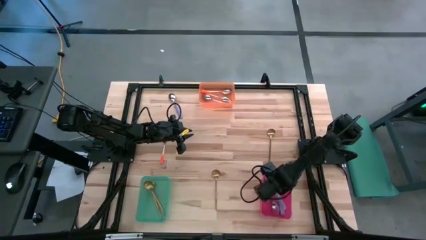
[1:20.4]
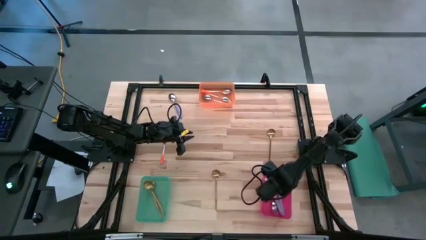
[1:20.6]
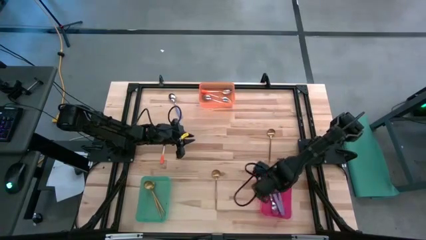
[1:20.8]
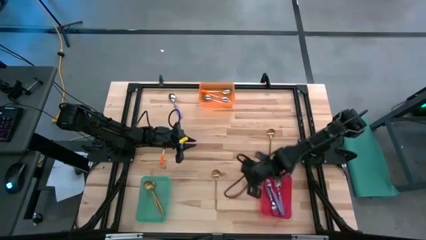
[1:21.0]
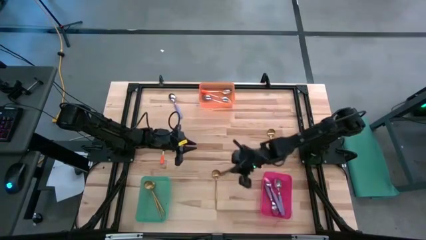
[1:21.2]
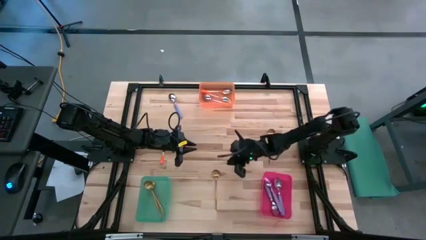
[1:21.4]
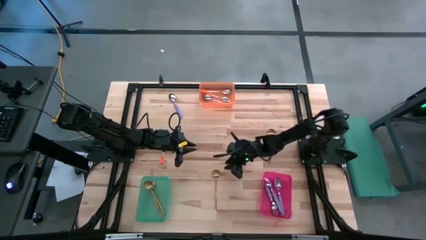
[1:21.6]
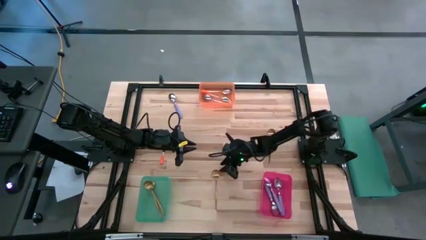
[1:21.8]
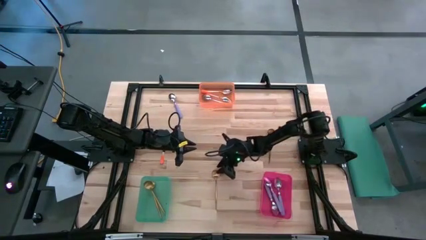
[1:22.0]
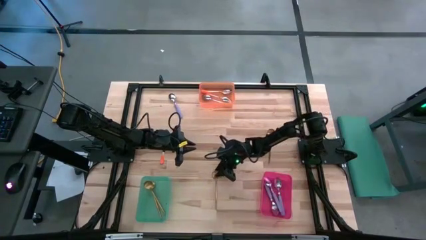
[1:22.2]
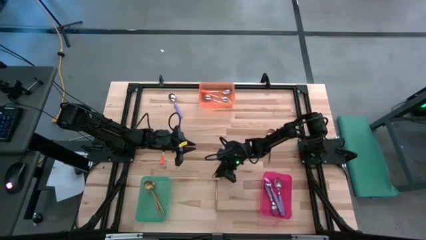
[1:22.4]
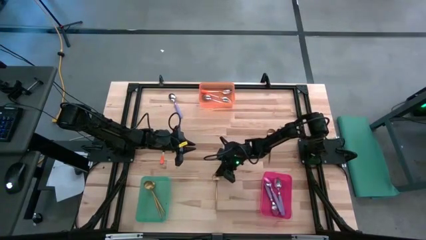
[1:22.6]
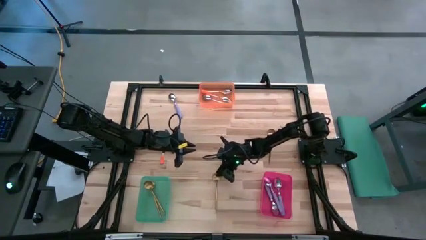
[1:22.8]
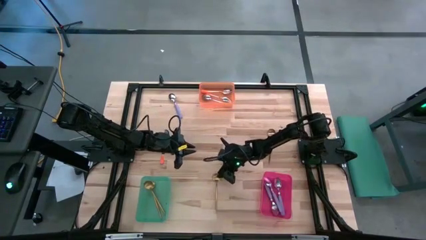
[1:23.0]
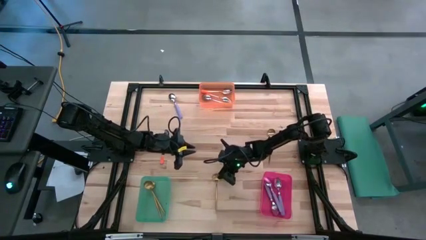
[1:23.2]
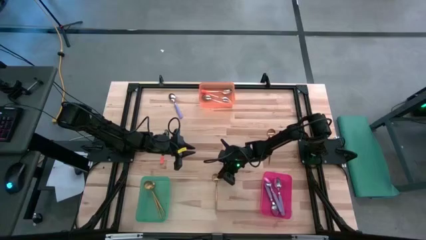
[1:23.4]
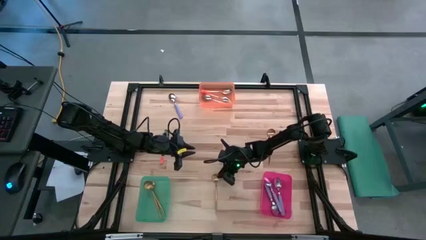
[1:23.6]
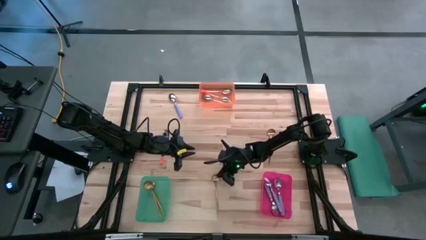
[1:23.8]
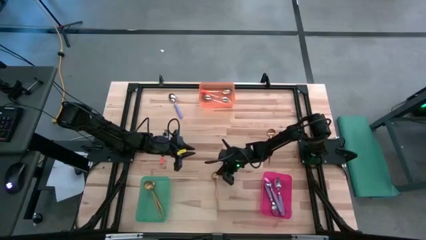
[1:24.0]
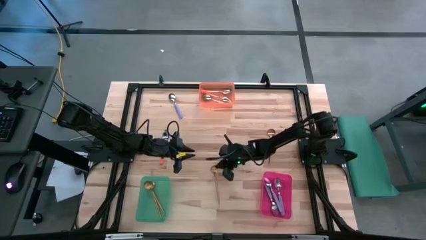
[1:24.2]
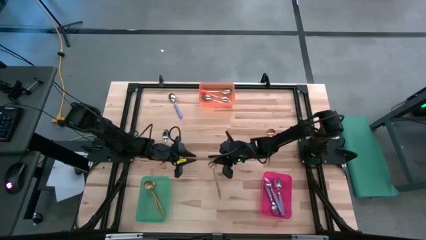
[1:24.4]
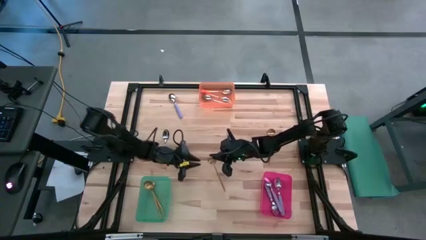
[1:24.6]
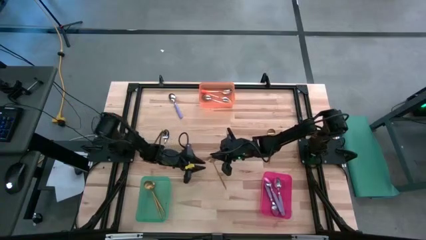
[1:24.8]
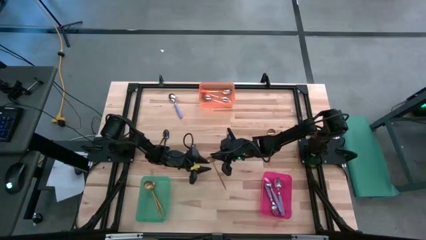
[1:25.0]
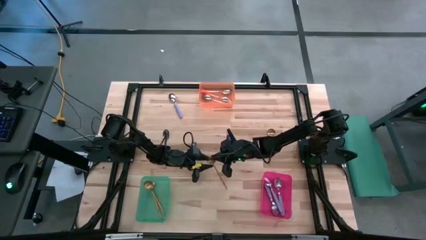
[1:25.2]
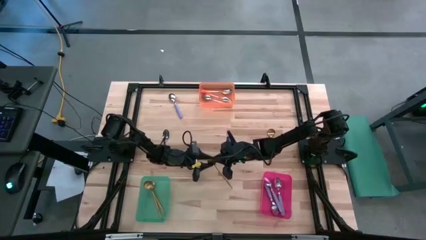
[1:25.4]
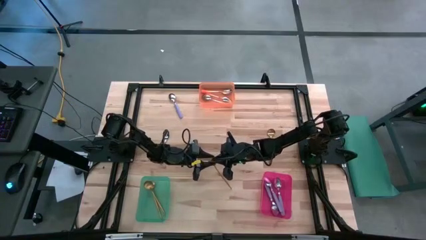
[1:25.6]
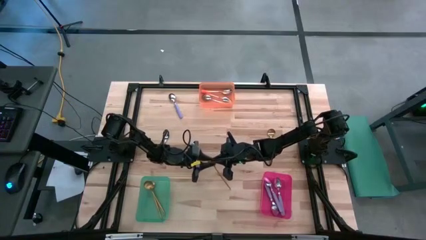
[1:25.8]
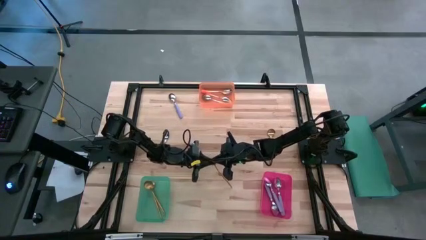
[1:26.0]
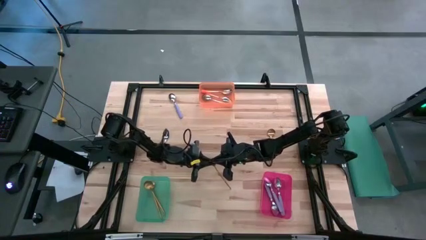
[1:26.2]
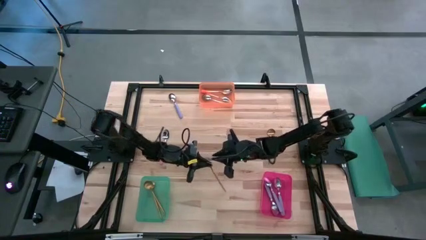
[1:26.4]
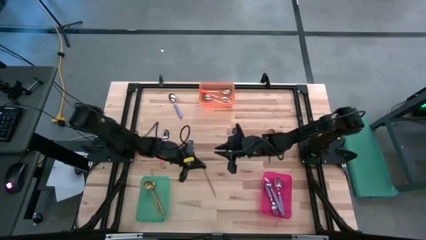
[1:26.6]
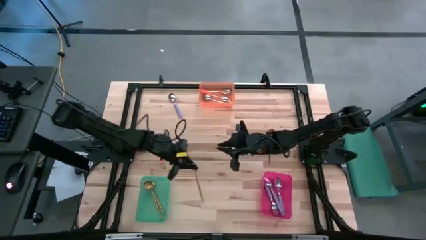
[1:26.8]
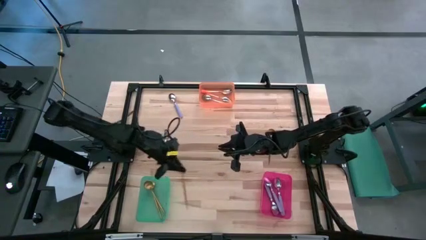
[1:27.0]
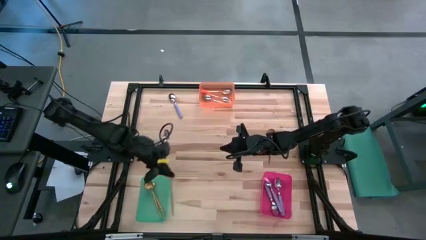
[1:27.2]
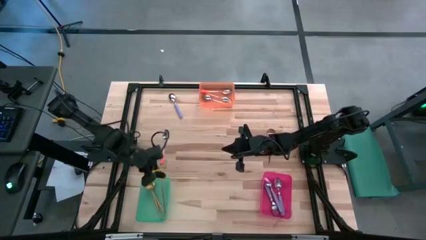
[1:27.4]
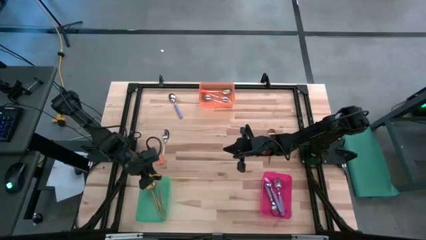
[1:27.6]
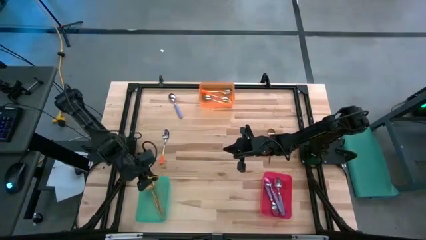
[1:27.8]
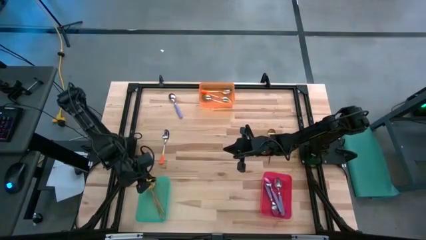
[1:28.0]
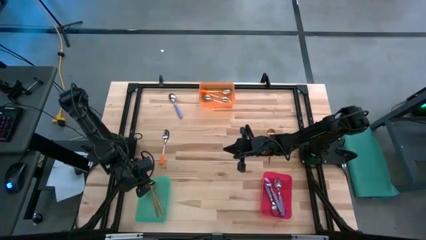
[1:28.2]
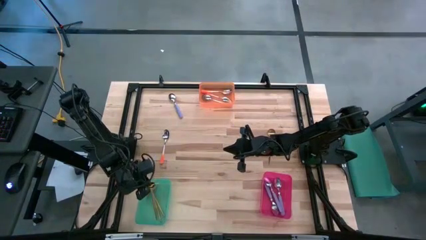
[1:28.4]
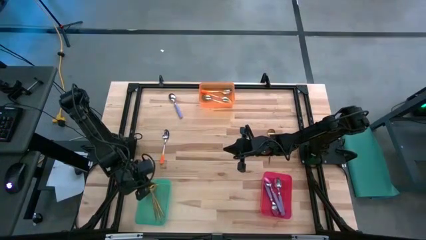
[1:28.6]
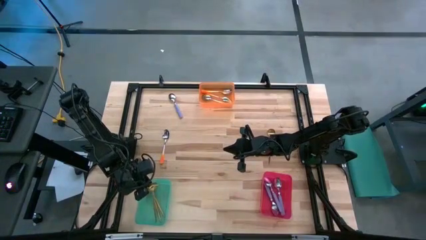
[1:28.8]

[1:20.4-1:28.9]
Task: Sort silverware by color (type)
Put the golden spoon into the green bin

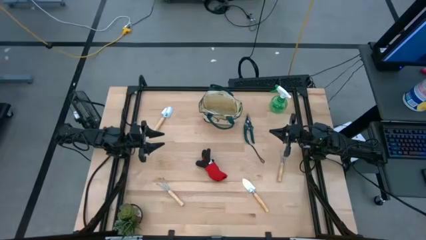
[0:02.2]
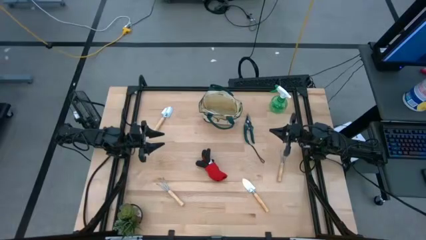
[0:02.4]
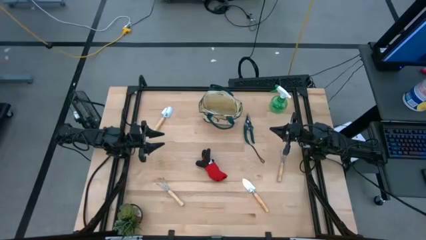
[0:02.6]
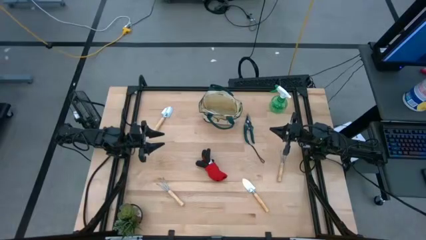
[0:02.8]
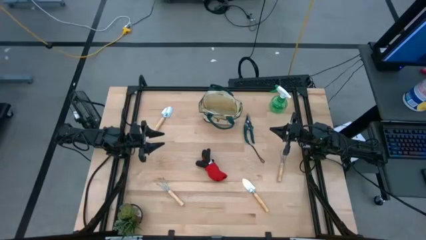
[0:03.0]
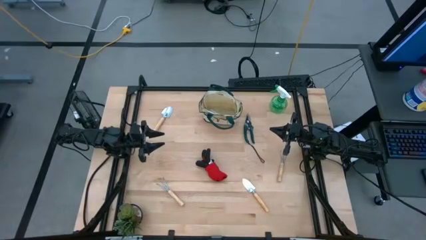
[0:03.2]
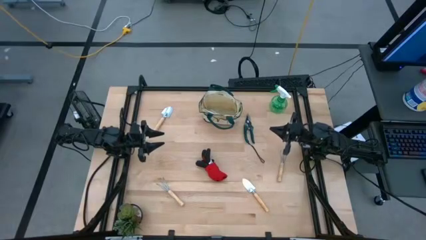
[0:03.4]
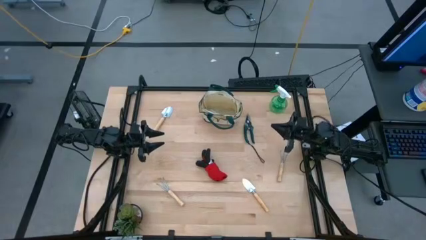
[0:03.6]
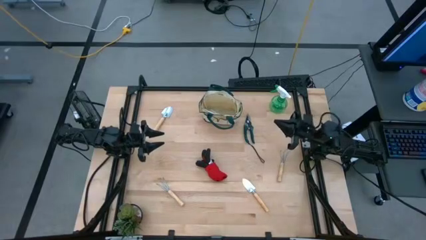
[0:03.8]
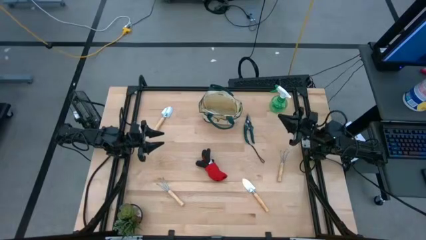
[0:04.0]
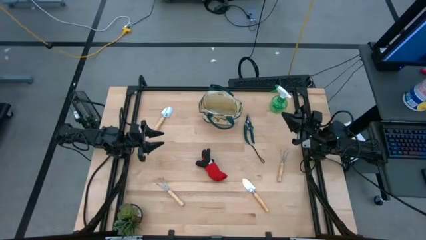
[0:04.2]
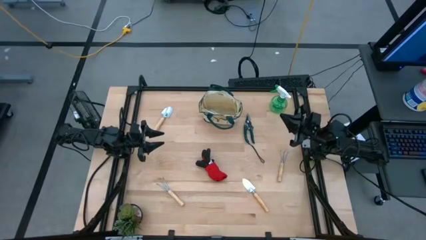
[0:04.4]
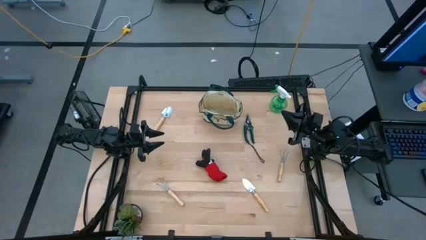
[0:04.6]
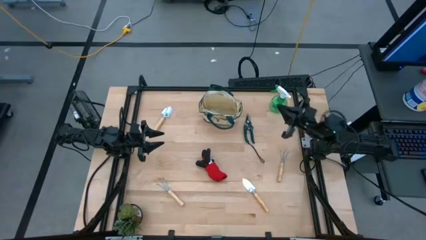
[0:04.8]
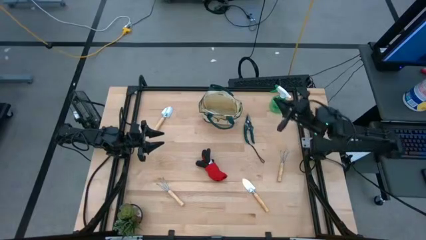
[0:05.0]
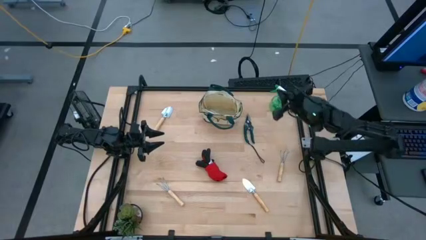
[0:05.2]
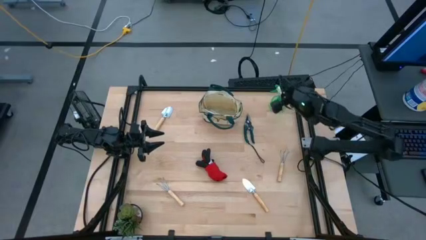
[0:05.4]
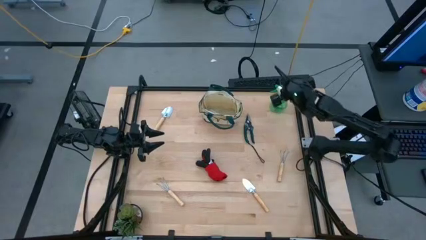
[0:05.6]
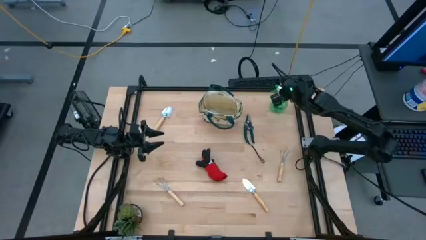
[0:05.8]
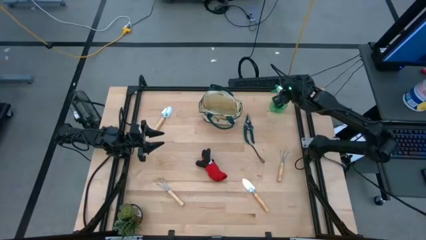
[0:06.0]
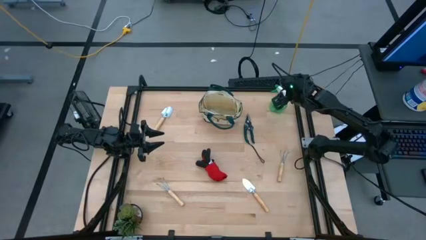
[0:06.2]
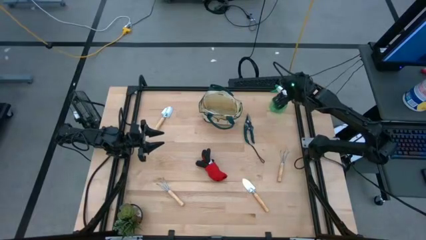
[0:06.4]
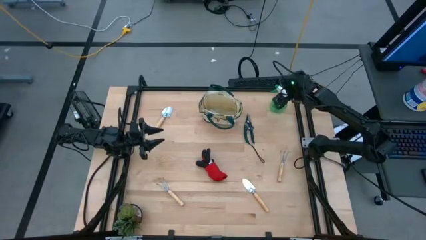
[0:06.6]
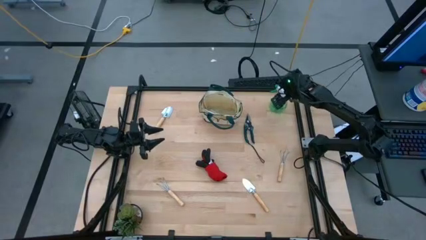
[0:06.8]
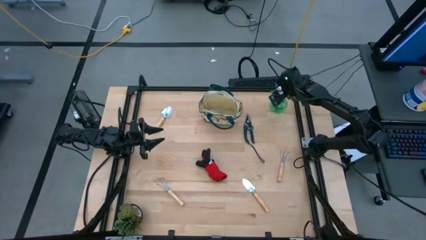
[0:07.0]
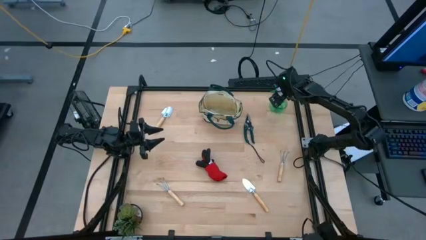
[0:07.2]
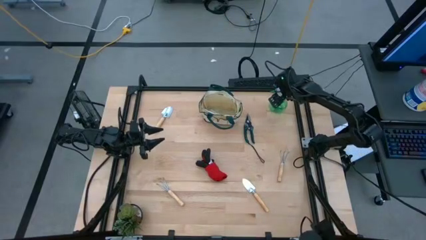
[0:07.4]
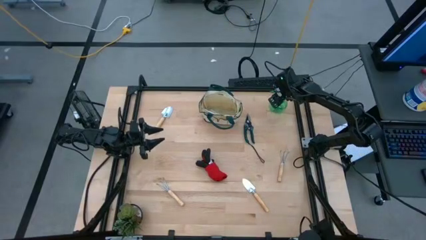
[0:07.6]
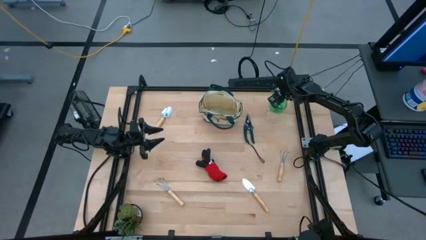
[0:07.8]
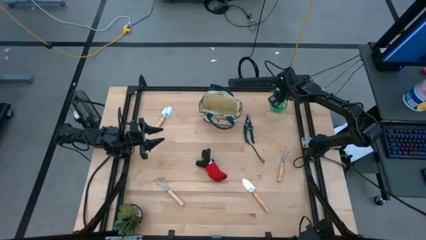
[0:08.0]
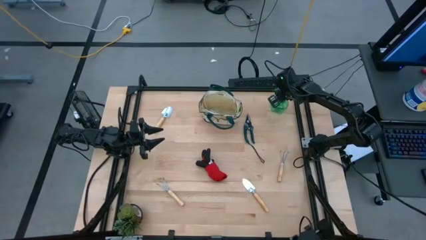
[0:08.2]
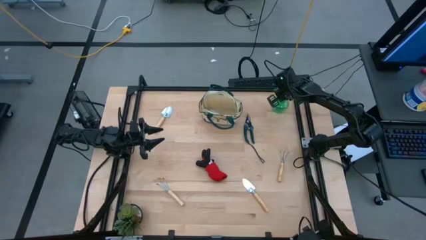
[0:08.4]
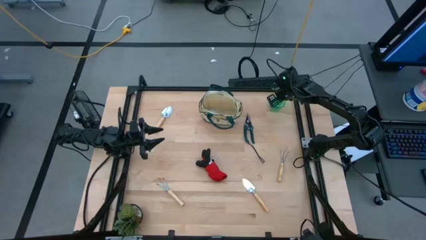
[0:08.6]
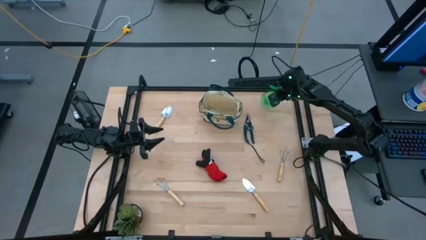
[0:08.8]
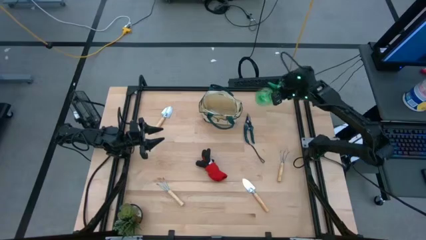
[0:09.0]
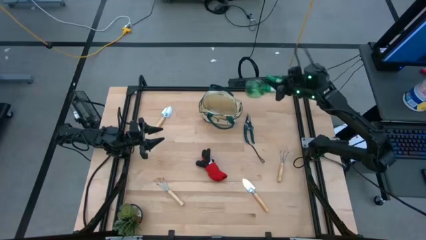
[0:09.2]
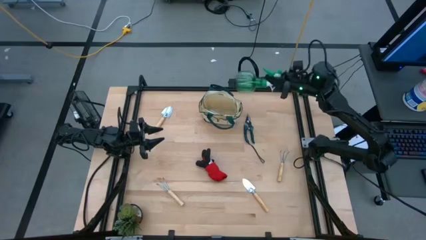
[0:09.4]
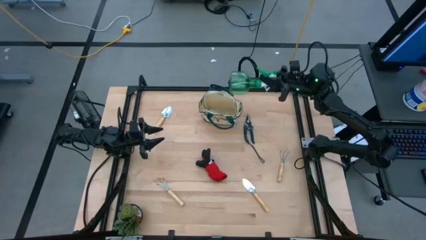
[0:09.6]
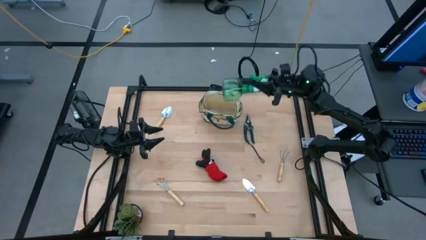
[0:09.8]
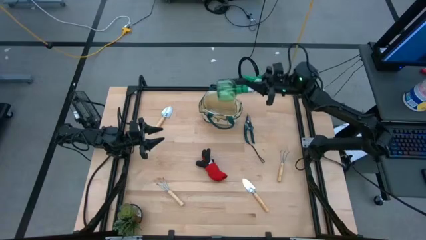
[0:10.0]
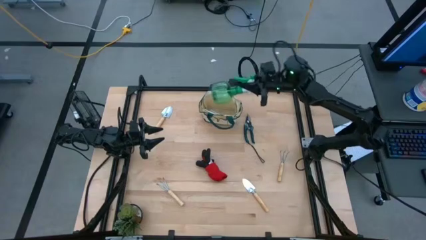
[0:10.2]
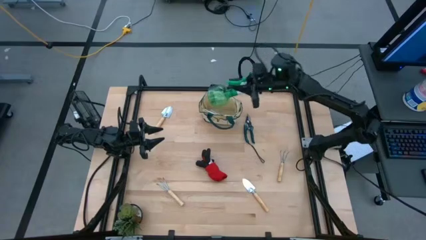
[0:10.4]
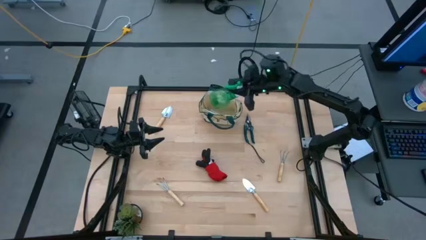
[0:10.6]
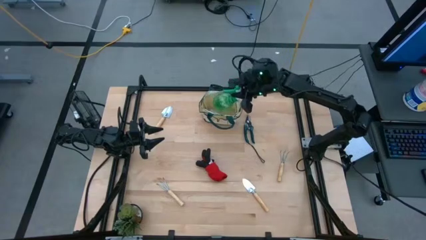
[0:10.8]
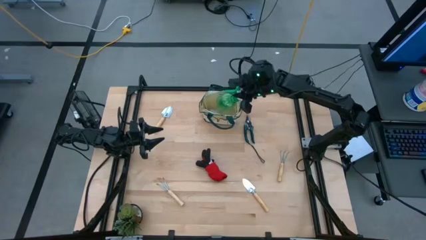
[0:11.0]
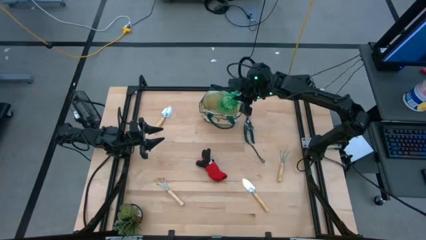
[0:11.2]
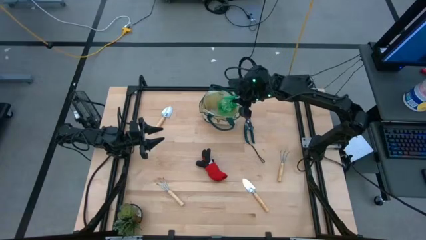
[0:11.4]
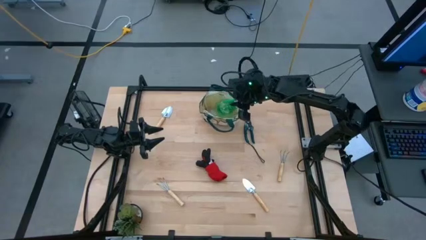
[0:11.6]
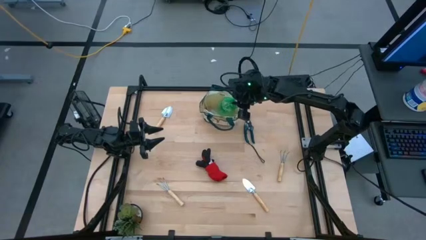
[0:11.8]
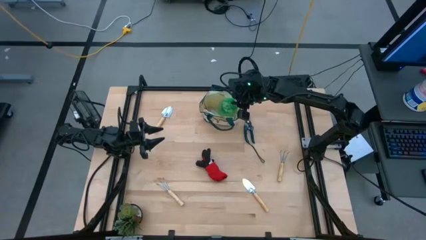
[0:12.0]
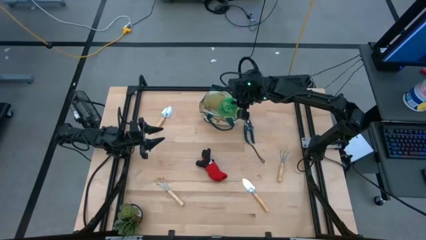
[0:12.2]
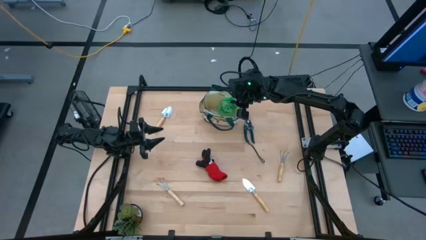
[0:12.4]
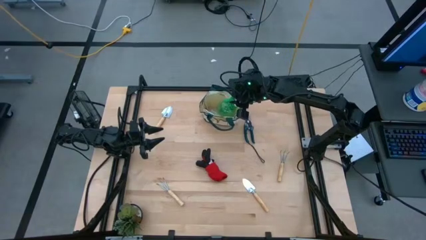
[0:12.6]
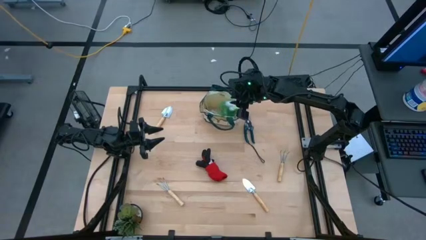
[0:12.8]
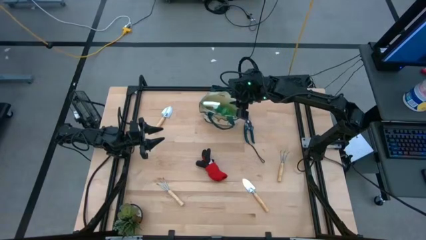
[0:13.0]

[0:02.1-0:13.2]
Task: Pick & Place Garden tools in Gardening bag
Put the green spray bottle into the green gardening bag
